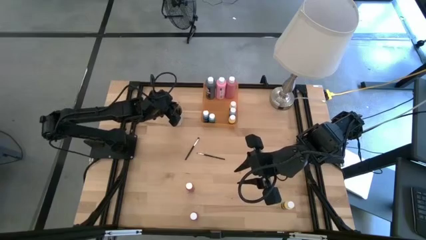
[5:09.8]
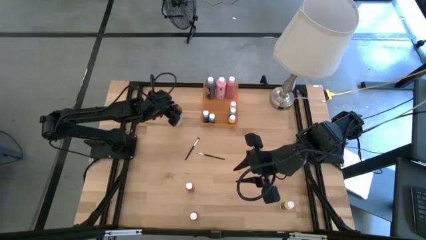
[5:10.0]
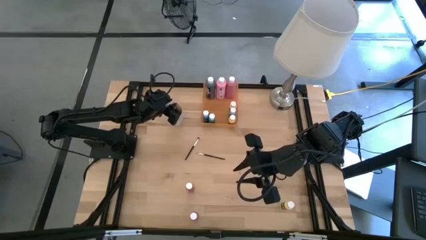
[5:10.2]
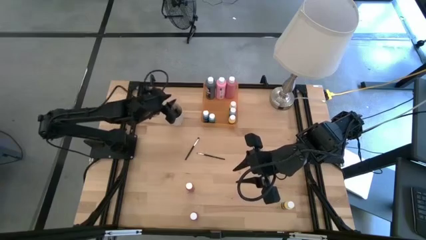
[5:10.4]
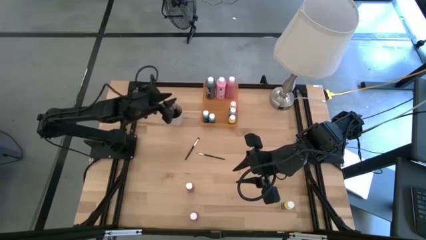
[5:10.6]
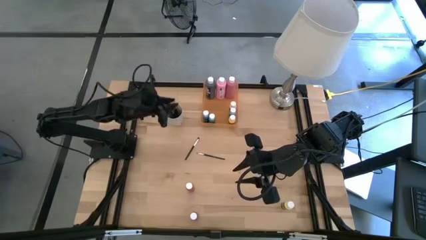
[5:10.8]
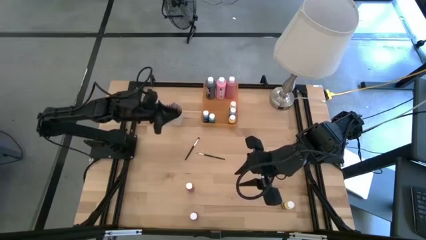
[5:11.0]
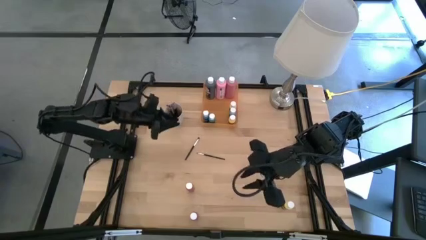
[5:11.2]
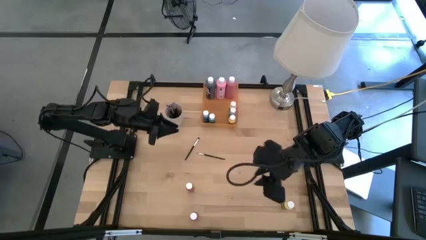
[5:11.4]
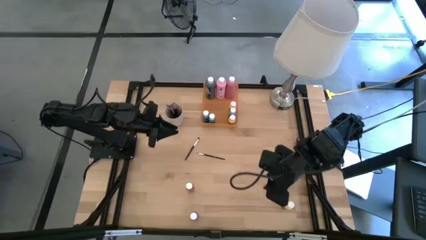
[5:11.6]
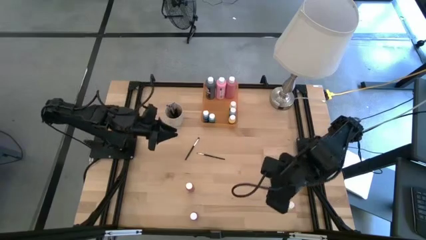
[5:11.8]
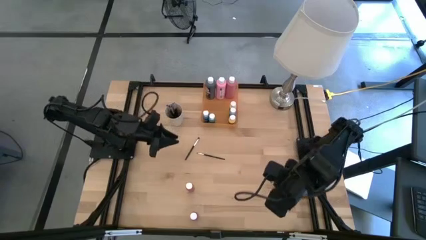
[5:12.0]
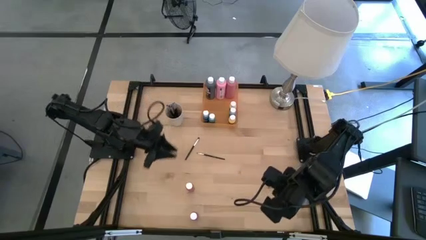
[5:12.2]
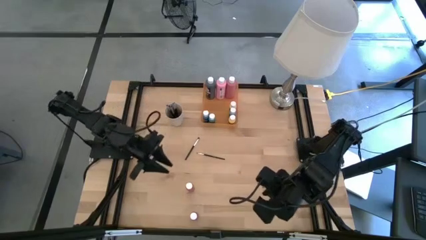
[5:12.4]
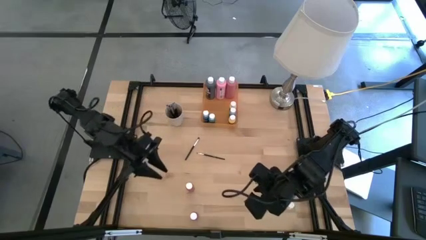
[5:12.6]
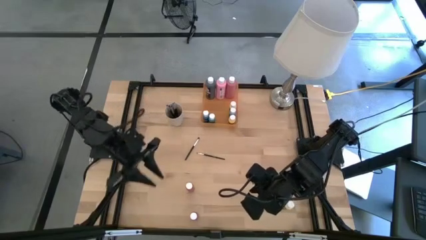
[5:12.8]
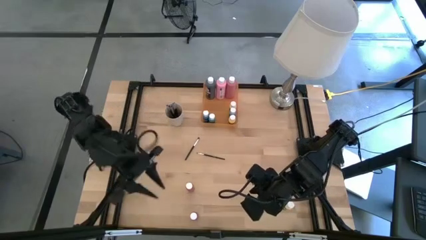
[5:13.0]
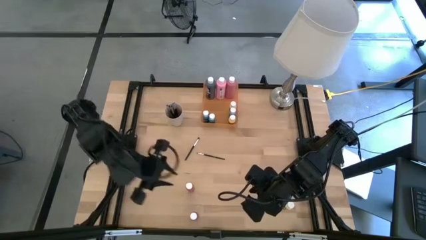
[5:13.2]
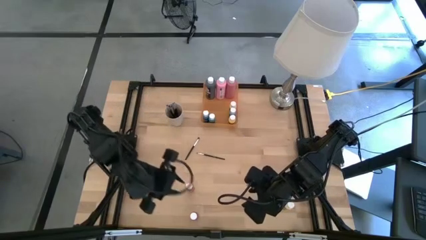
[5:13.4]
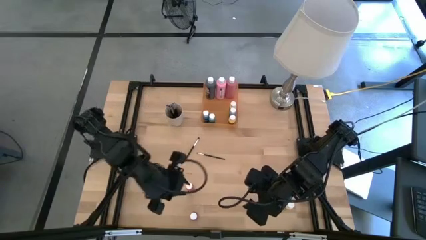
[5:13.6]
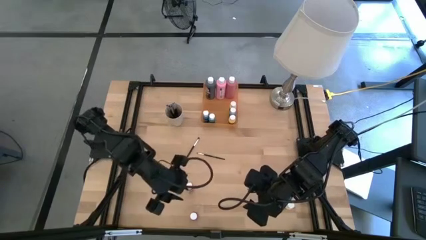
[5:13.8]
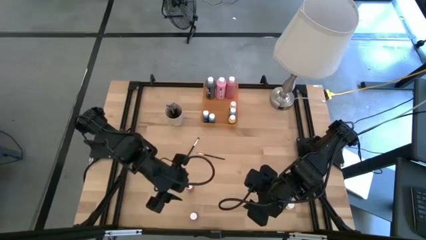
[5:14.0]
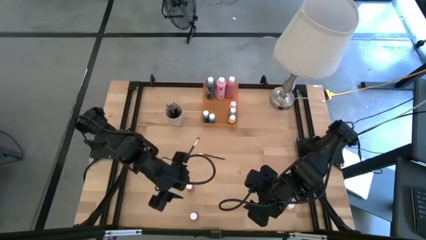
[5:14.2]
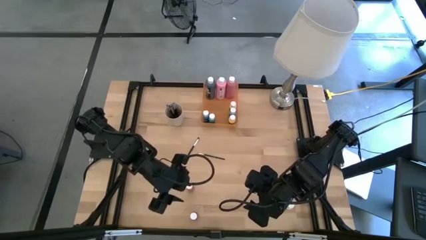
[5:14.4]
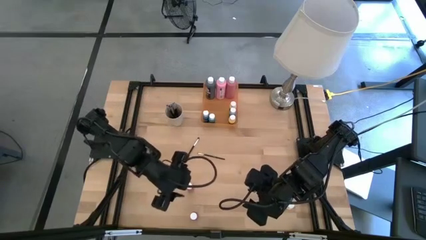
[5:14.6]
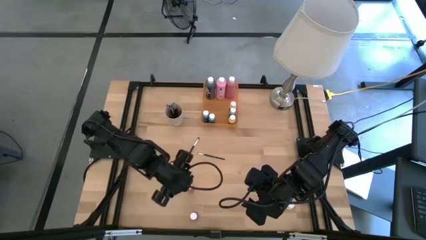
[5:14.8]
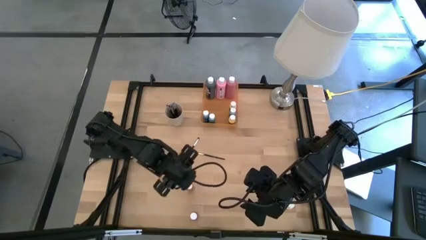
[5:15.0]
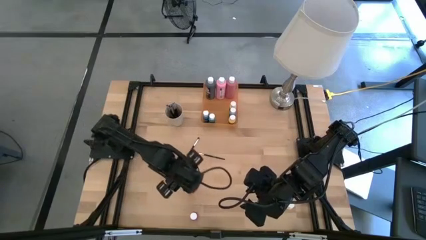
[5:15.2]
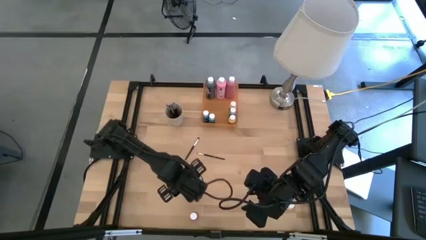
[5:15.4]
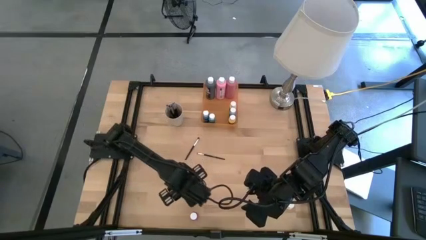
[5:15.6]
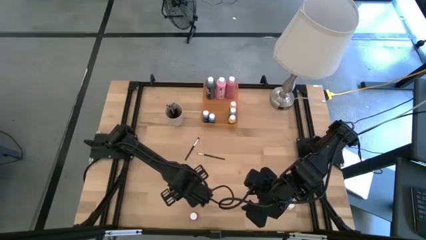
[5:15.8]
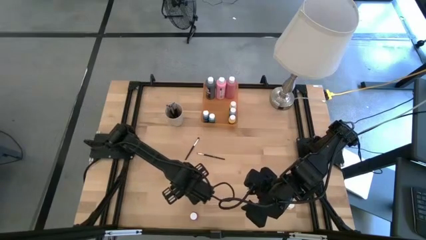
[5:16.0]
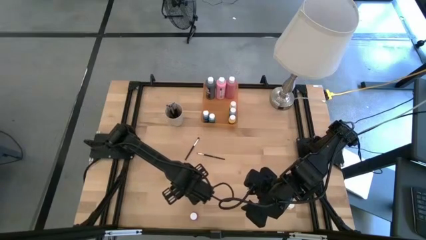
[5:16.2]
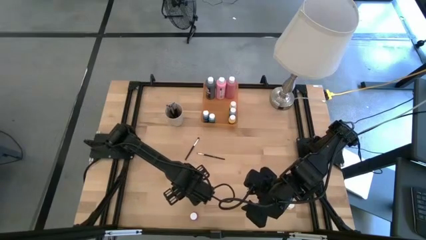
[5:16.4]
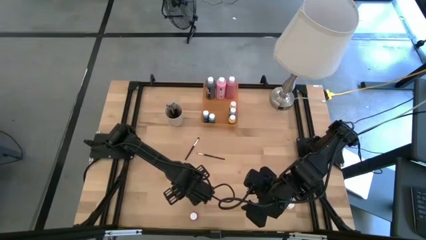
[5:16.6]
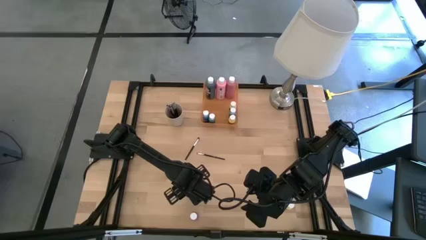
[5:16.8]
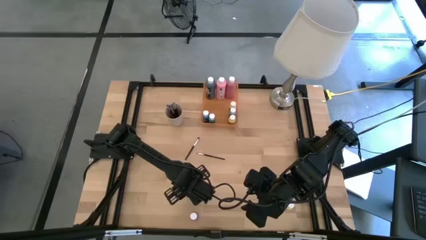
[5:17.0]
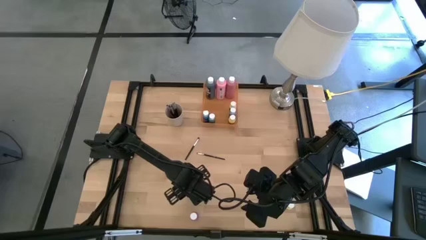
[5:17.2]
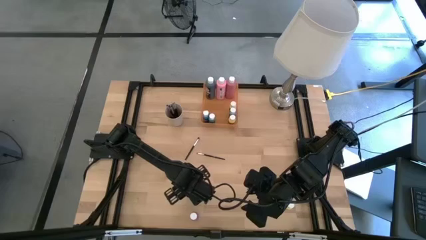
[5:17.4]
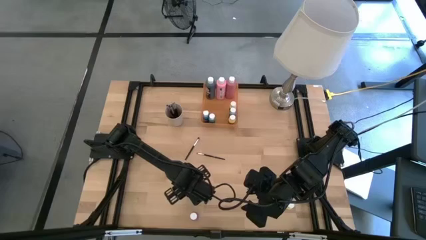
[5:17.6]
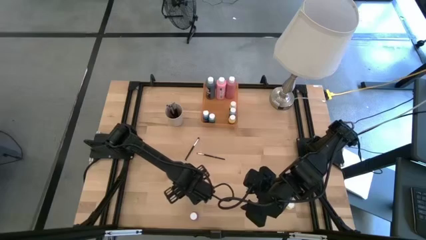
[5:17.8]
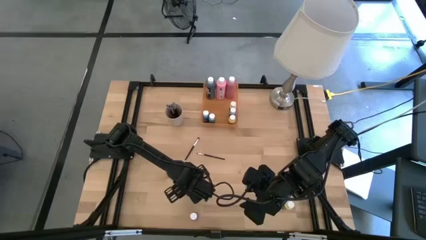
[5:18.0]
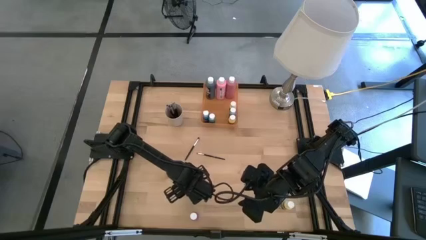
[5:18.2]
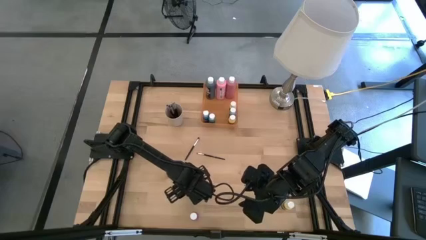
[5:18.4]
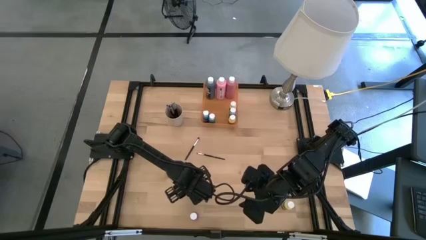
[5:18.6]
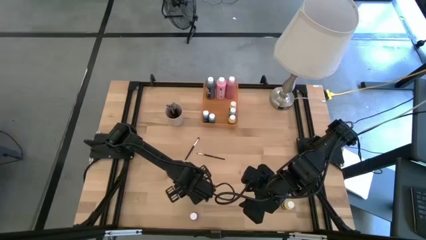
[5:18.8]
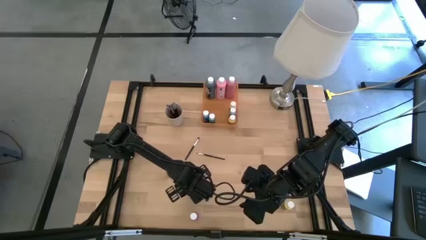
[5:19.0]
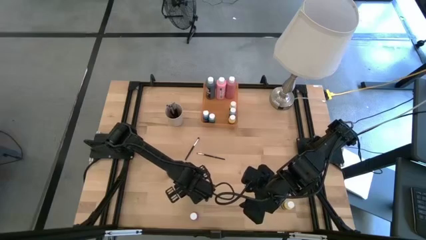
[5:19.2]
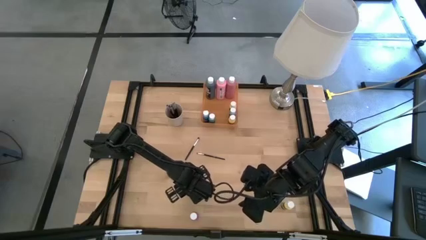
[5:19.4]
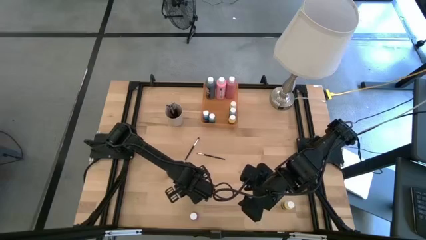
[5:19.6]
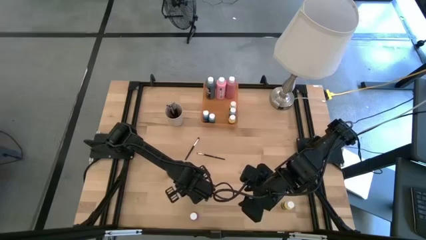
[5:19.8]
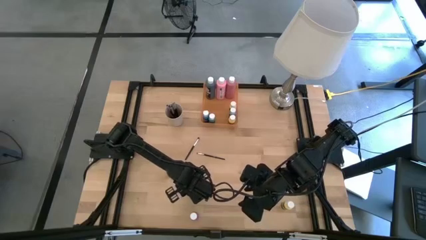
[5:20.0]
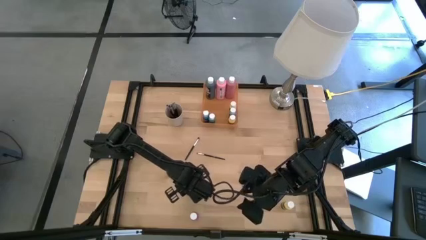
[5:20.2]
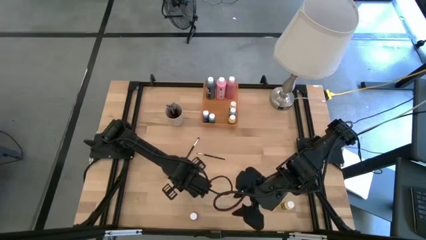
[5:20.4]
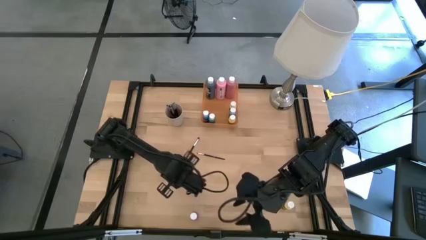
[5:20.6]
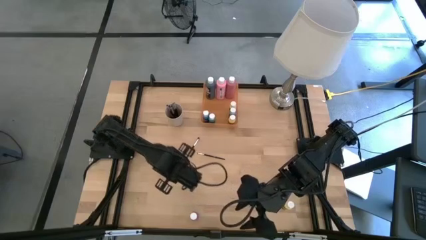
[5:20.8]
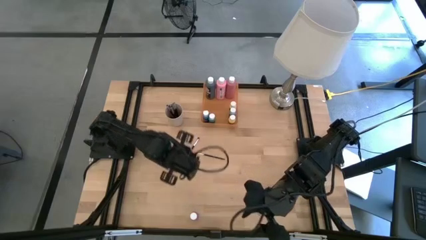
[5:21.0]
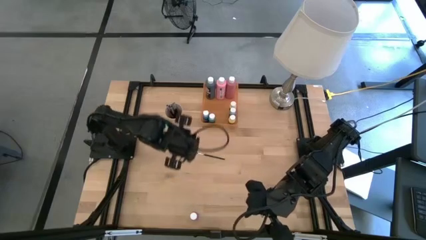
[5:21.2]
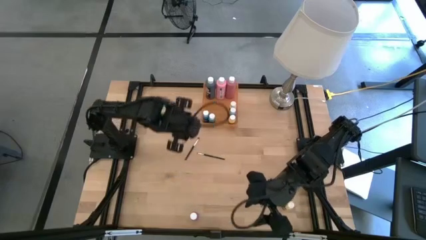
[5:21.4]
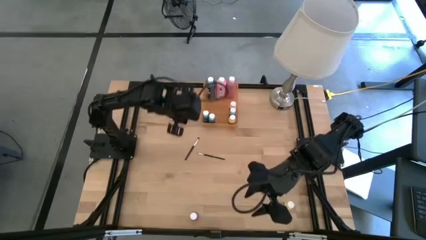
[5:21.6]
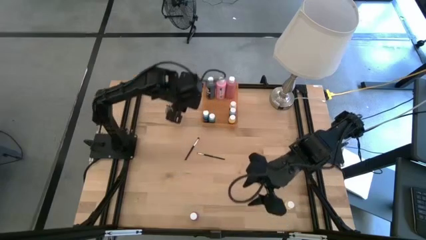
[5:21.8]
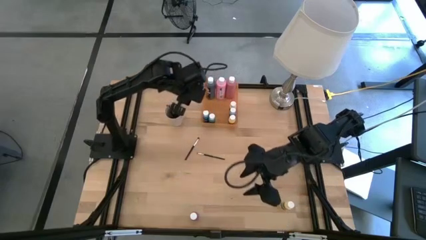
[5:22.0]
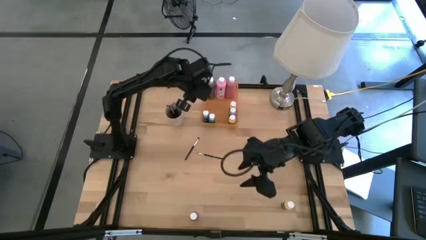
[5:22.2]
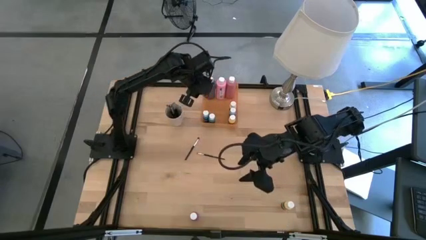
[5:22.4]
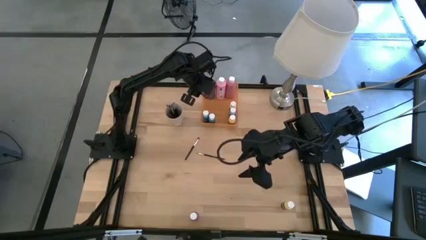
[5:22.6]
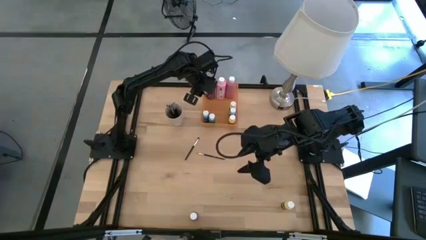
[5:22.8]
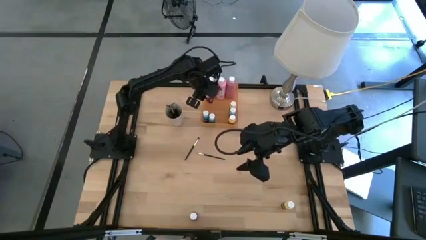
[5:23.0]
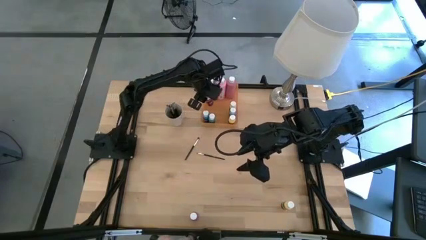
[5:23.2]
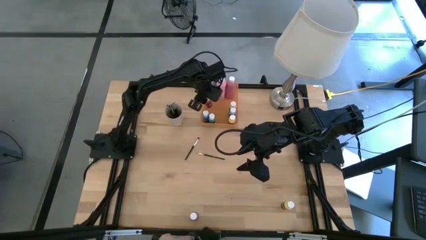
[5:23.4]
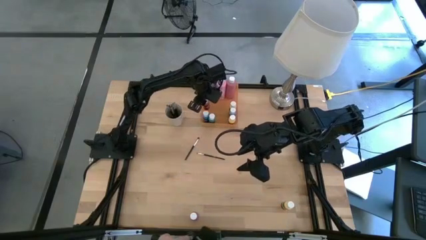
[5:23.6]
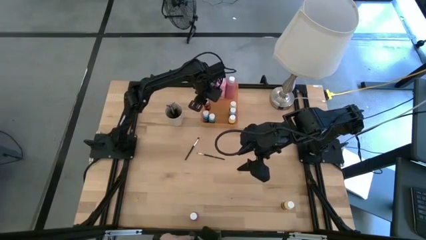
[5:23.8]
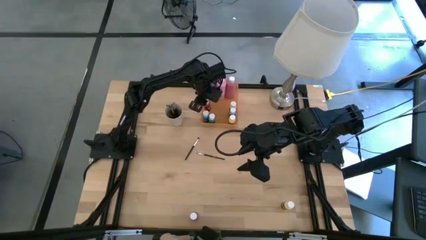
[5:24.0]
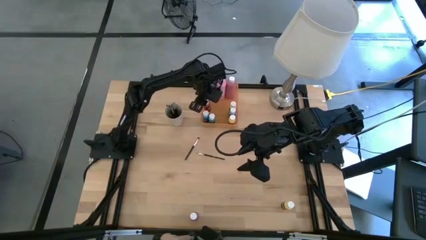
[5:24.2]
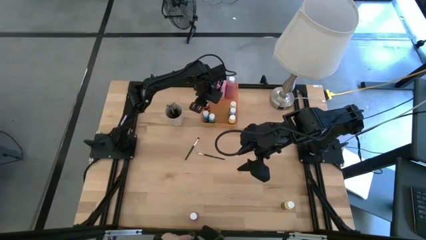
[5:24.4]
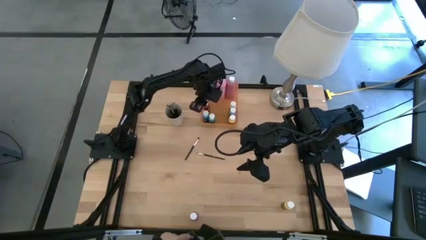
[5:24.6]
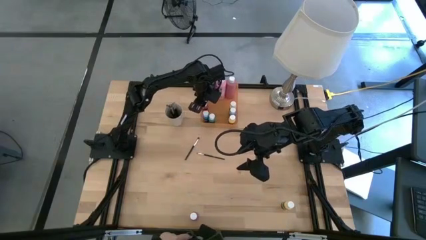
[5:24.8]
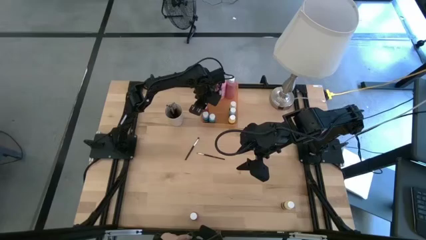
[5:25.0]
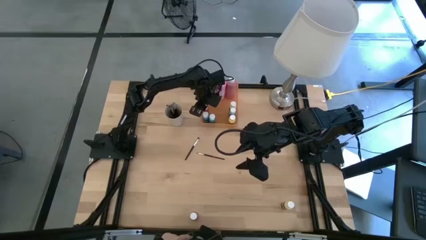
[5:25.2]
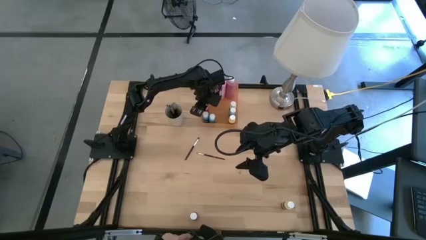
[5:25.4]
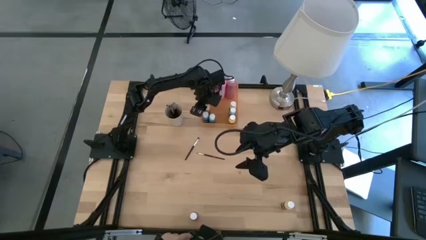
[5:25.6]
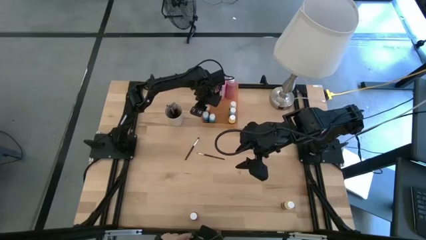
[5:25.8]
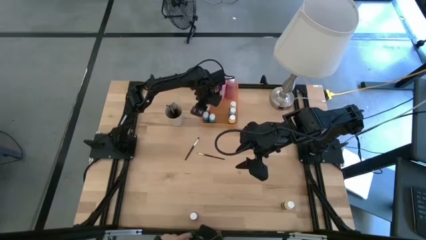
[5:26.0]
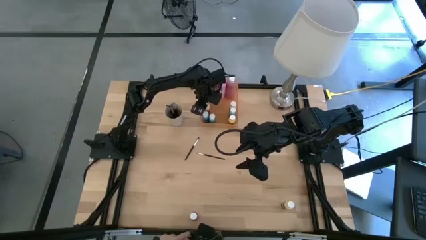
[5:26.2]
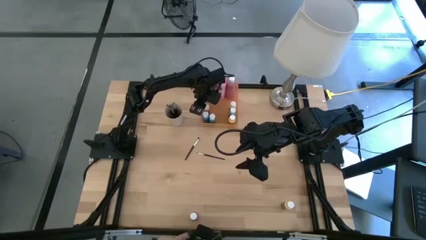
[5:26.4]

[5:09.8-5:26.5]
Task: Pick & Place Paint Supplies
Put the red paint bottle into the orange bin

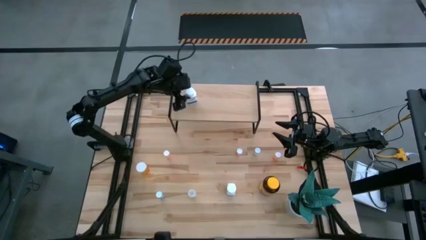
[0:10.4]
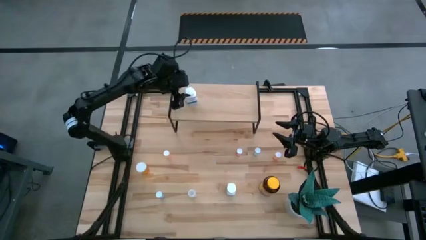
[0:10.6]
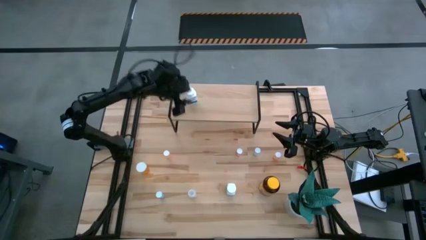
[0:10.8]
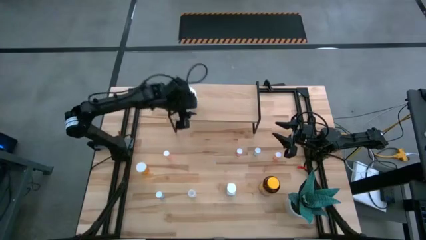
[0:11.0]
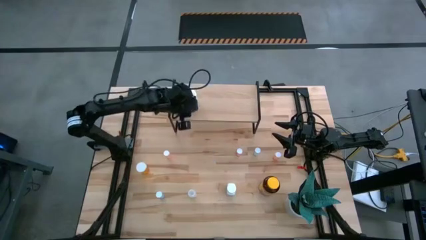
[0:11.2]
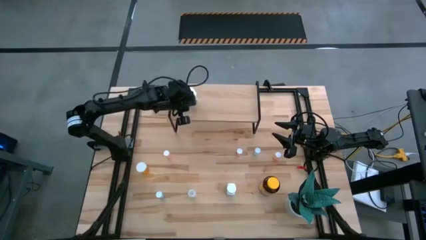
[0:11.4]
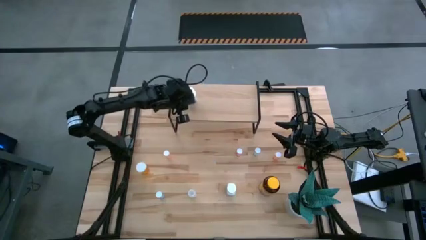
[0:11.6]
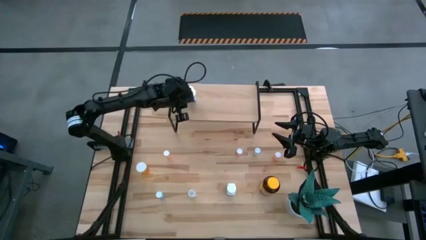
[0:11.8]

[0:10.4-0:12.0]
Task: Pick and place medicine bottles onto shelf by color
Adjust the white pill bottle on the shelf
